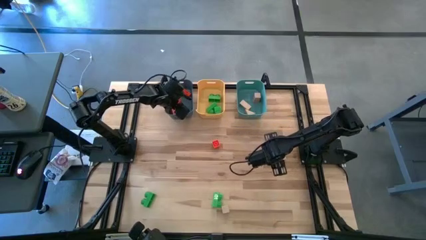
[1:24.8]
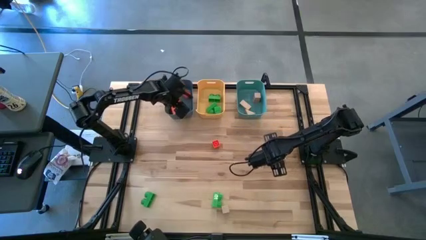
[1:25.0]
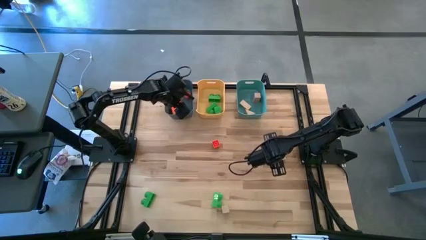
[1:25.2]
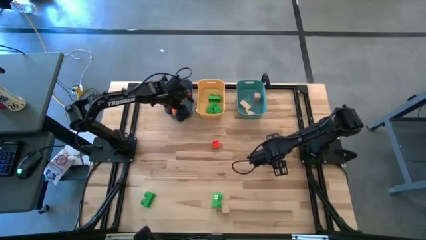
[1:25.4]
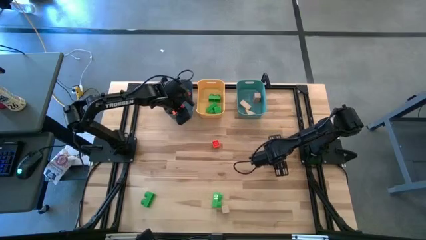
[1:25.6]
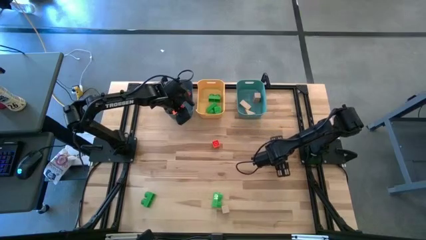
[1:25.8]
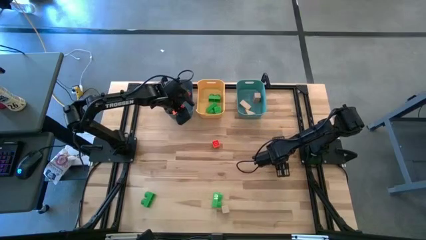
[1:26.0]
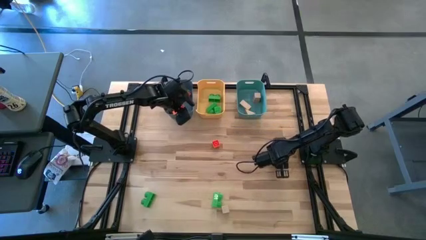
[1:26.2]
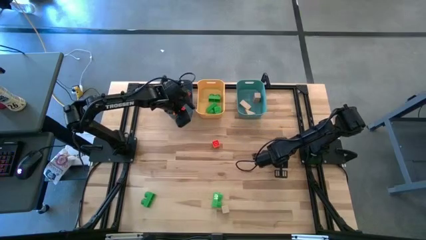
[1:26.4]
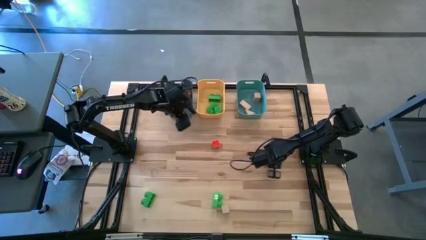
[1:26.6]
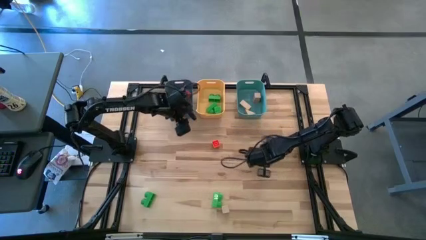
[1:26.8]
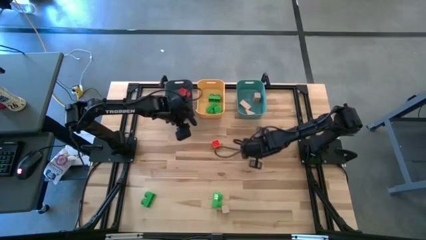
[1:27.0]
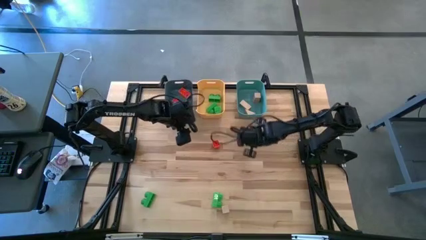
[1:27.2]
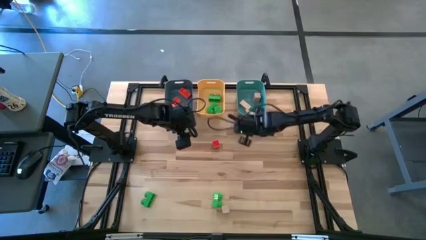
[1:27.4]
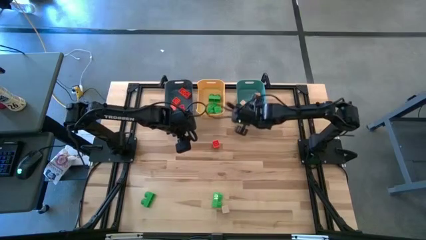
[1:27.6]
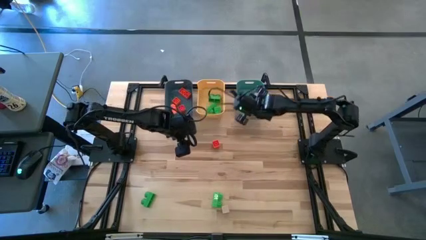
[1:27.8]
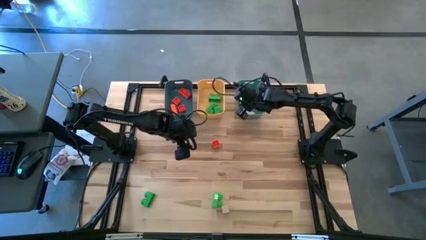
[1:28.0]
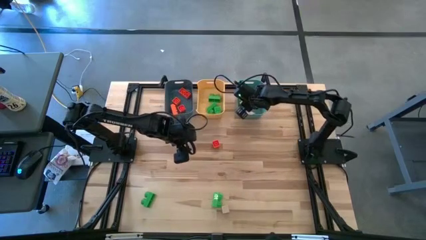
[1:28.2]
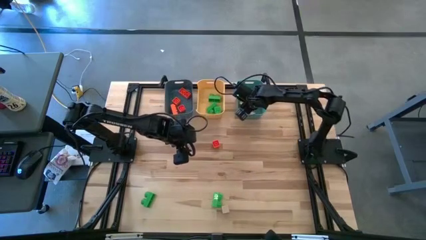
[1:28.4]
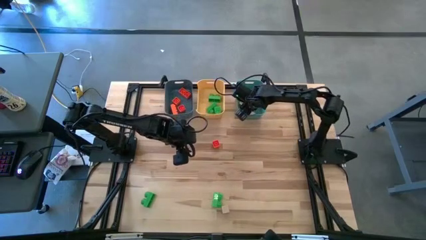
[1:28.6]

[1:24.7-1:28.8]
Task: Sort & place blocks by color
Put the brown block into the green bin

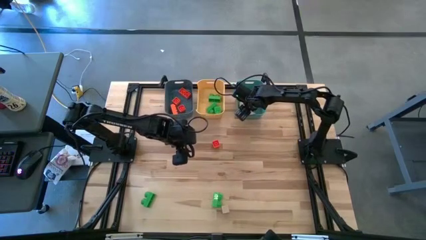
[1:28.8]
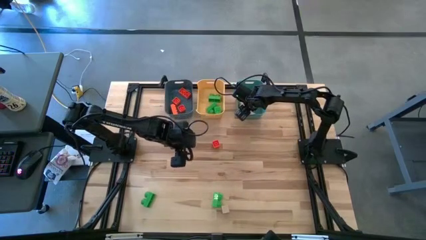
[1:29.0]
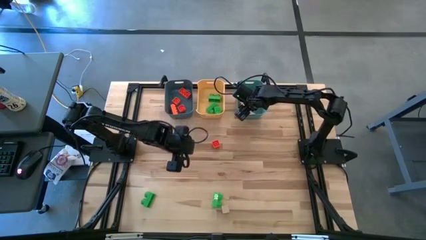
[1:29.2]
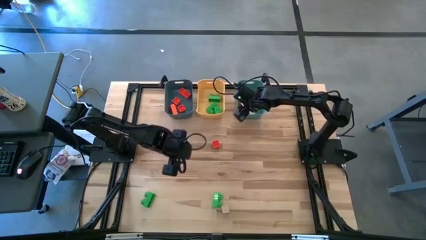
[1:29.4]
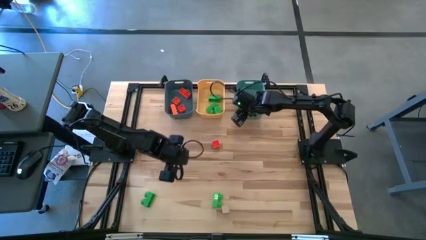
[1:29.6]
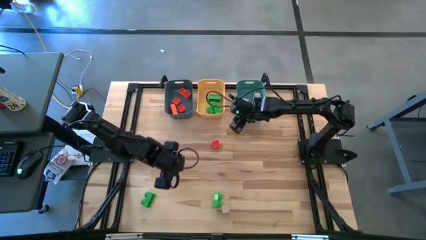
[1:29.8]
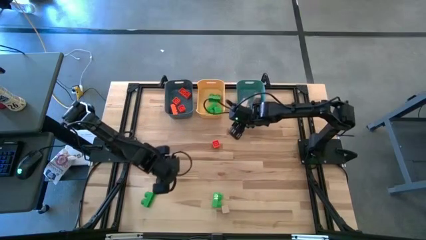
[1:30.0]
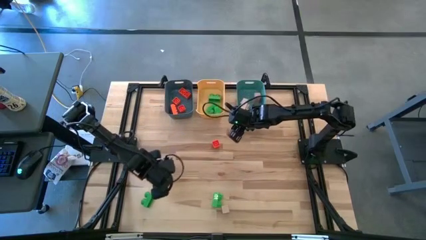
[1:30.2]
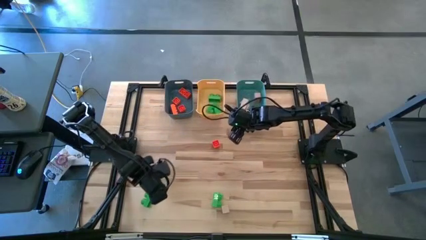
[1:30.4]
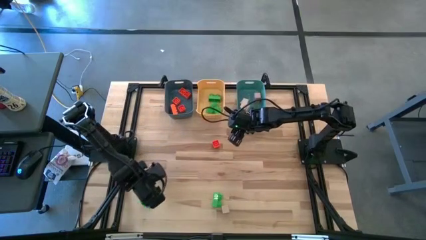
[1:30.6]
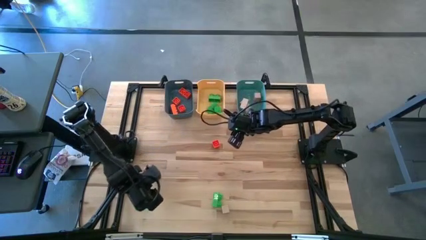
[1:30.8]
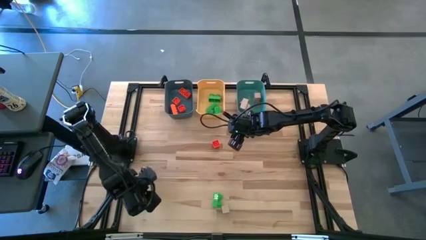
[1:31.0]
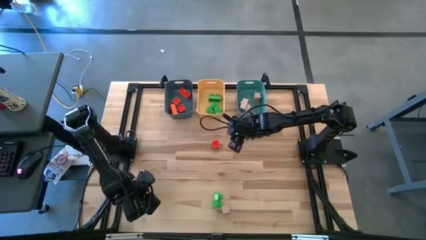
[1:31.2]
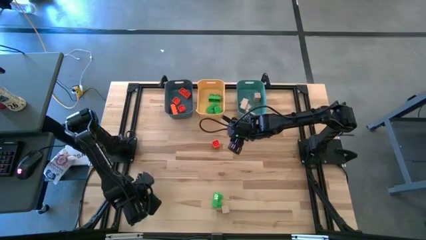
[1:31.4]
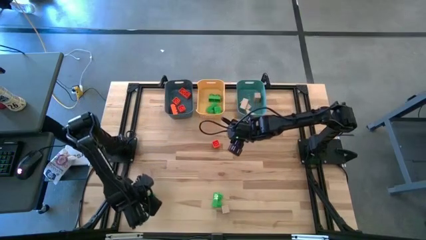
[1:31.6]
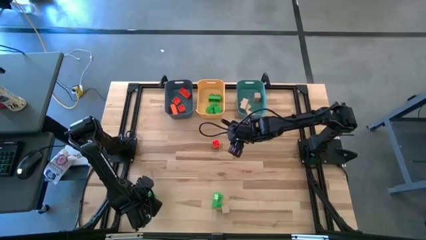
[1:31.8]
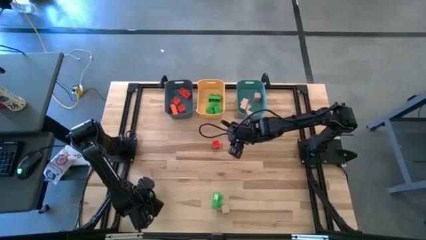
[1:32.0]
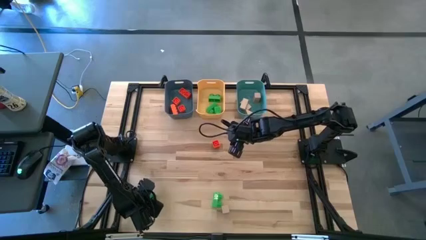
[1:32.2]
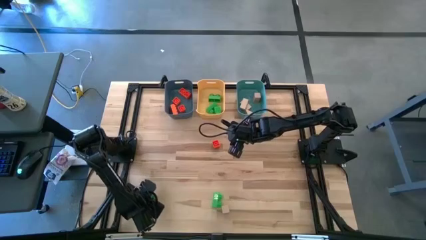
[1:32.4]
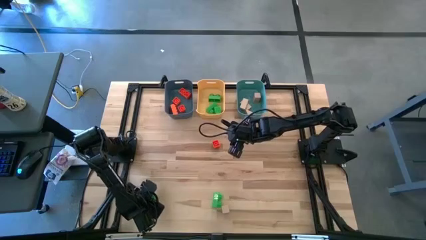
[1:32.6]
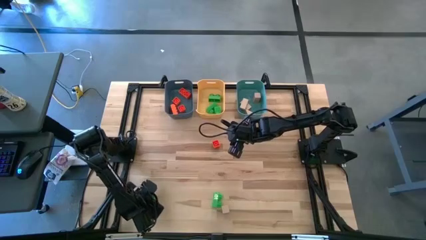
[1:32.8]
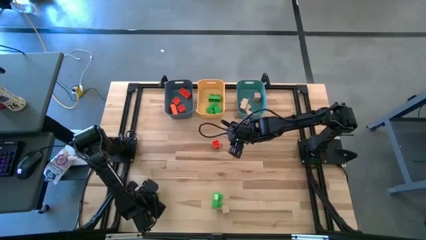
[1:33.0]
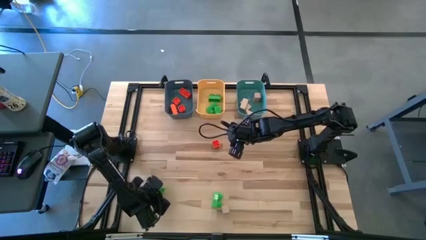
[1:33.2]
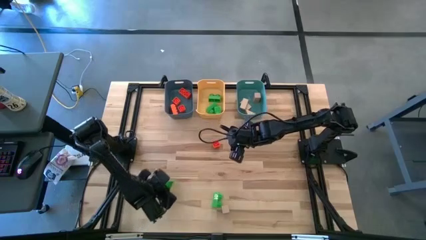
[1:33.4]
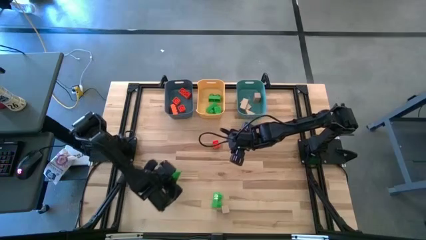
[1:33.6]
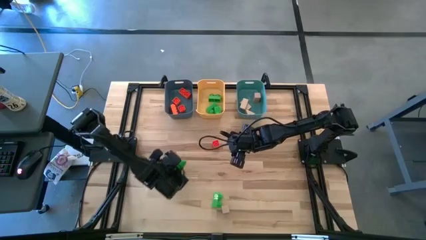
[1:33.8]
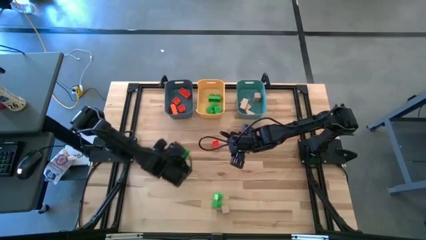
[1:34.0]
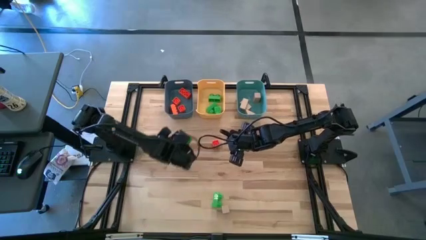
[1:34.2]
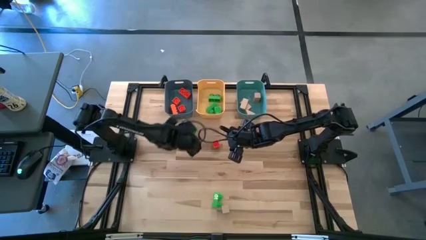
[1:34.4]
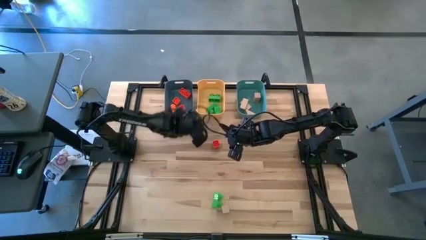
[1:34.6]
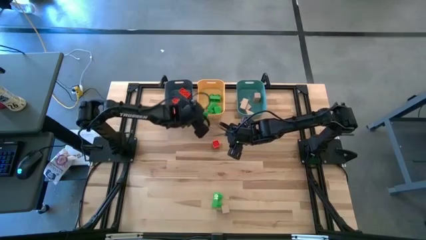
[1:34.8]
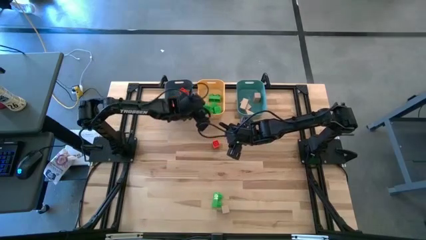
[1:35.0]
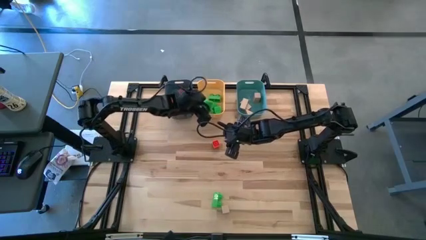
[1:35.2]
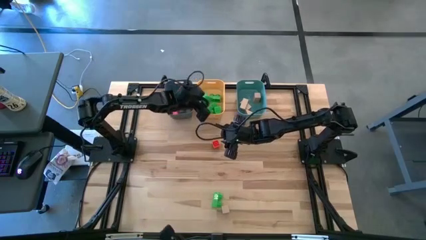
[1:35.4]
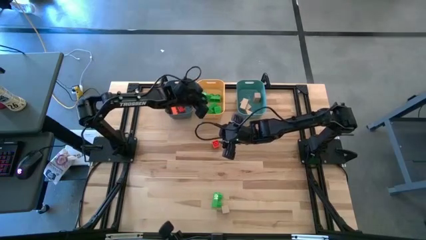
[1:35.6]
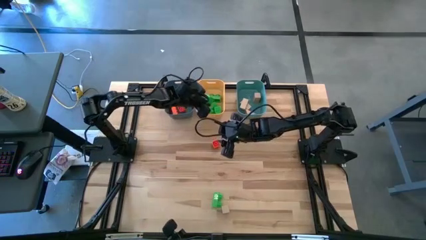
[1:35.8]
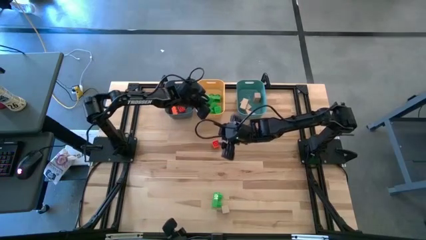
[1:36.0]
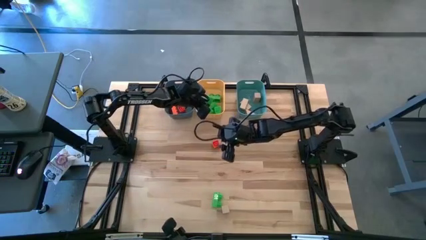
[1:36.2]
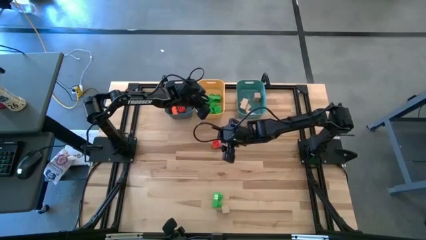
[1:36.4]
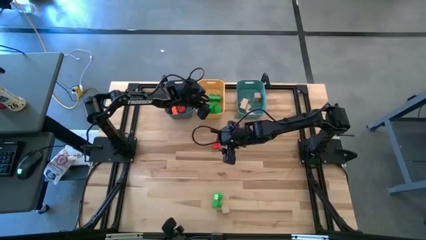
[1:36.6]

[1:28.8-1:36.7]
Put the green game piece into the yellow bin
